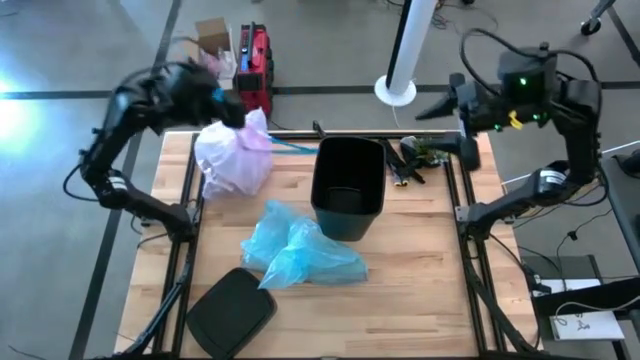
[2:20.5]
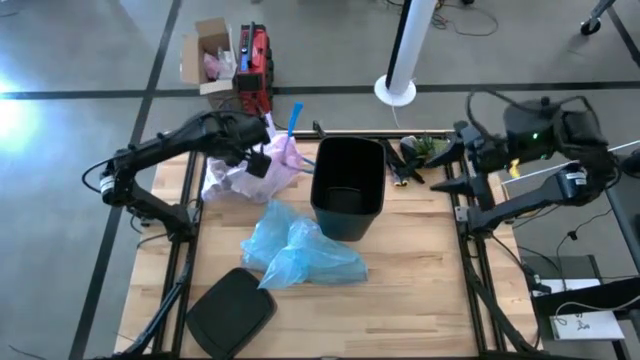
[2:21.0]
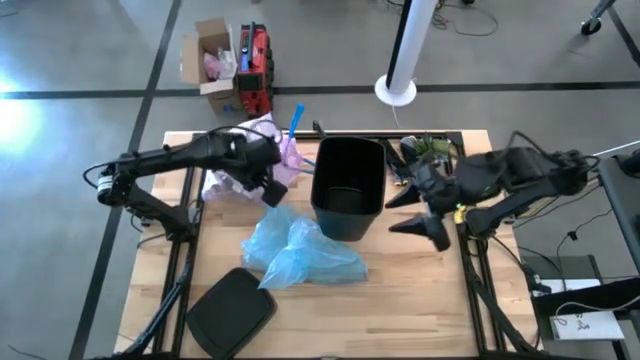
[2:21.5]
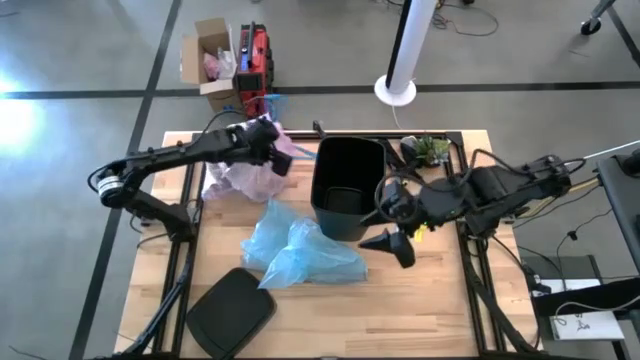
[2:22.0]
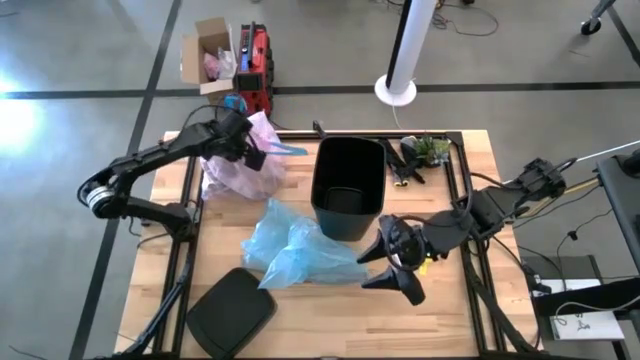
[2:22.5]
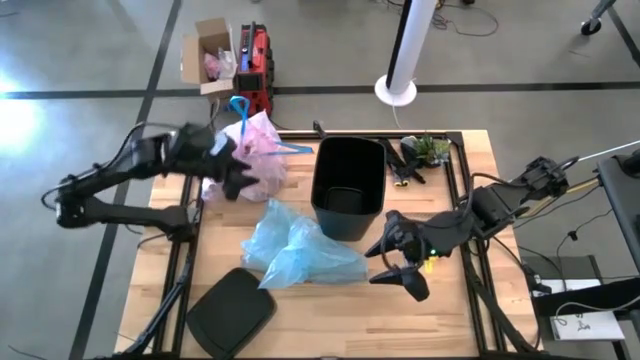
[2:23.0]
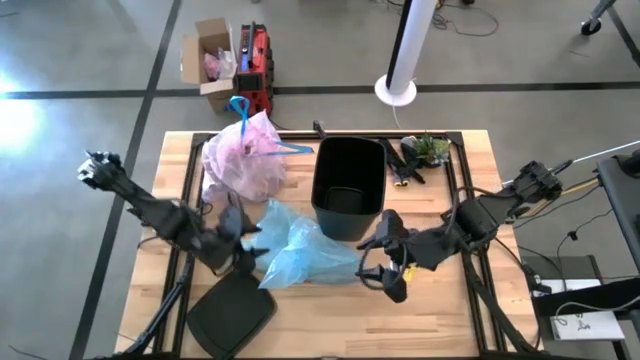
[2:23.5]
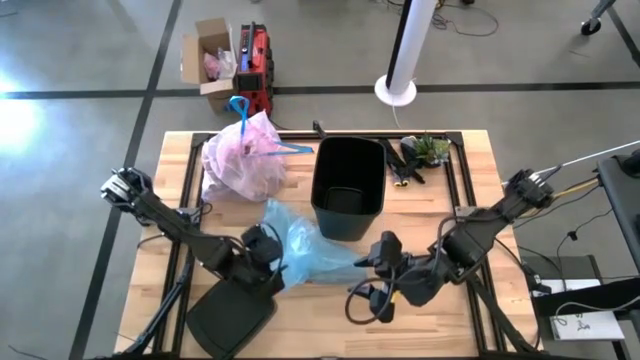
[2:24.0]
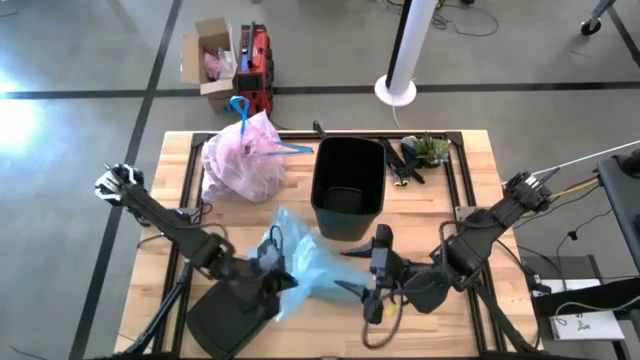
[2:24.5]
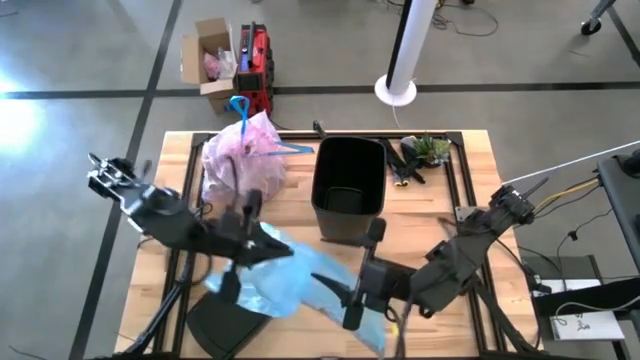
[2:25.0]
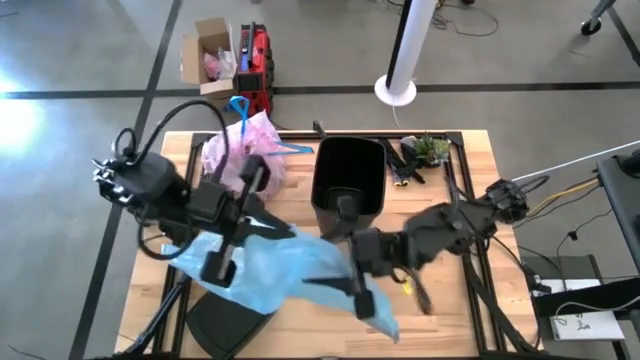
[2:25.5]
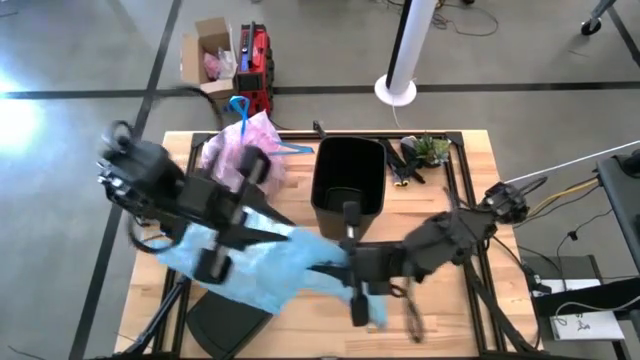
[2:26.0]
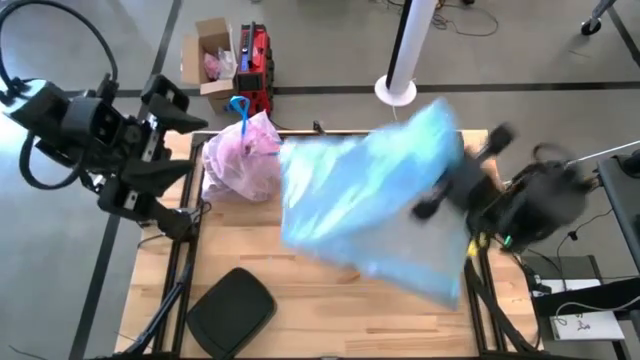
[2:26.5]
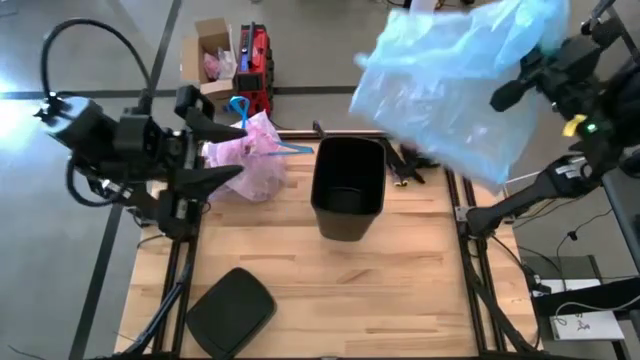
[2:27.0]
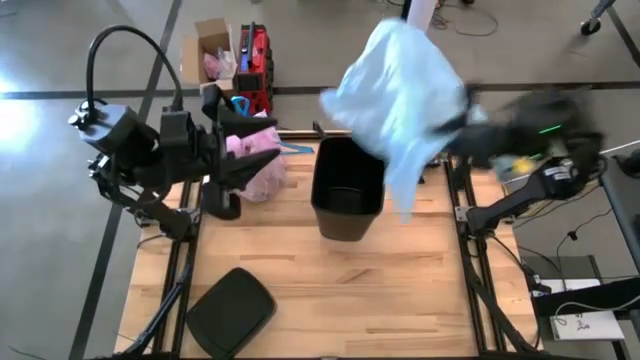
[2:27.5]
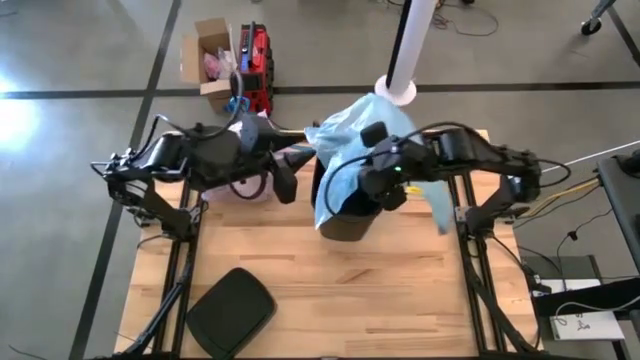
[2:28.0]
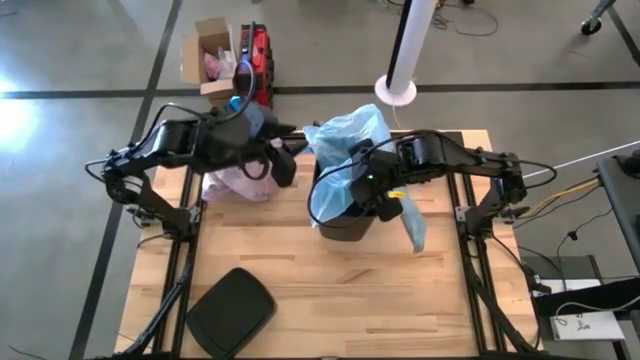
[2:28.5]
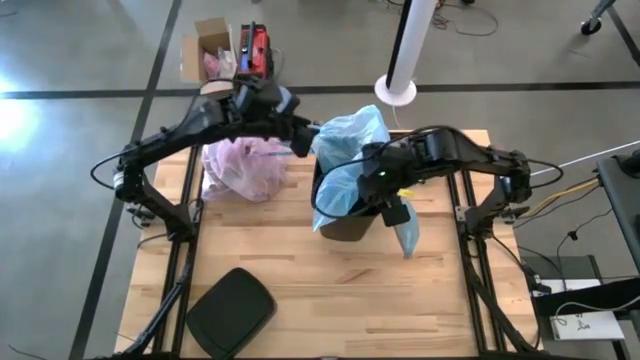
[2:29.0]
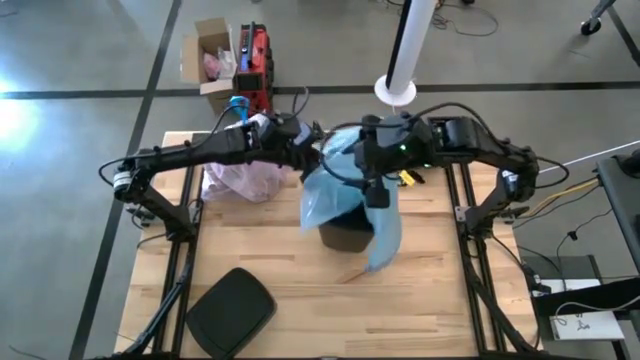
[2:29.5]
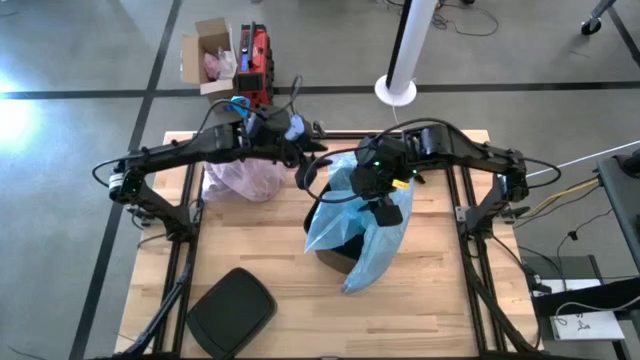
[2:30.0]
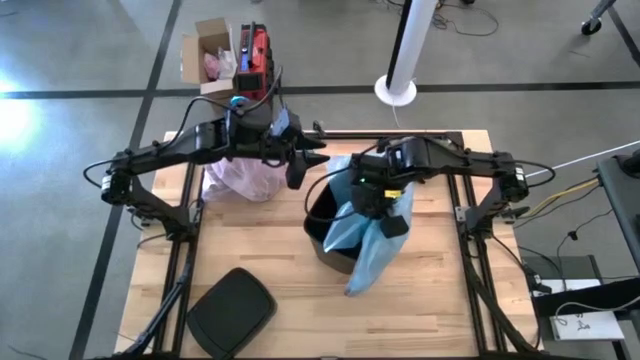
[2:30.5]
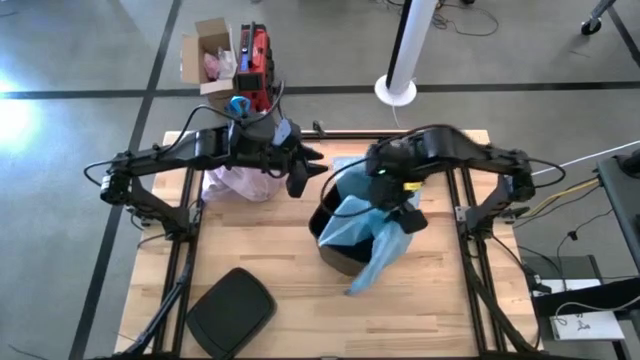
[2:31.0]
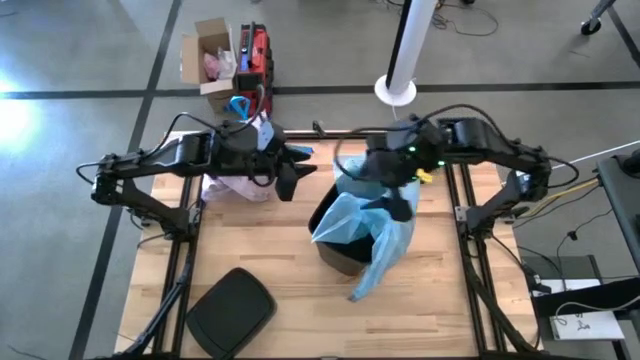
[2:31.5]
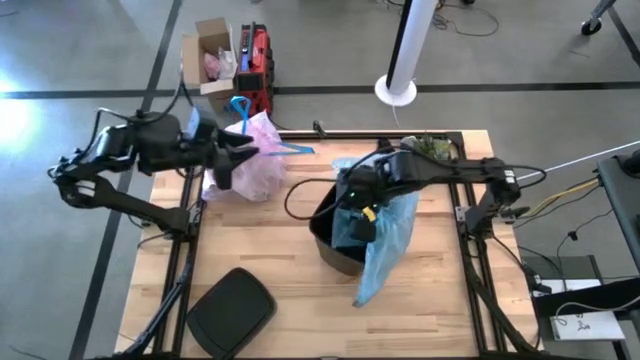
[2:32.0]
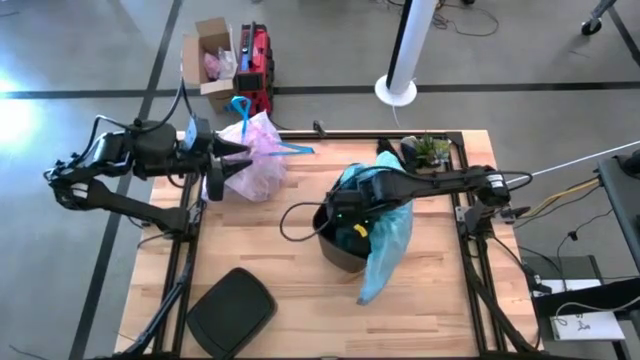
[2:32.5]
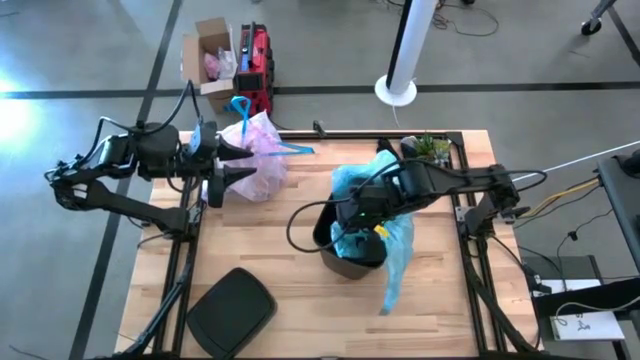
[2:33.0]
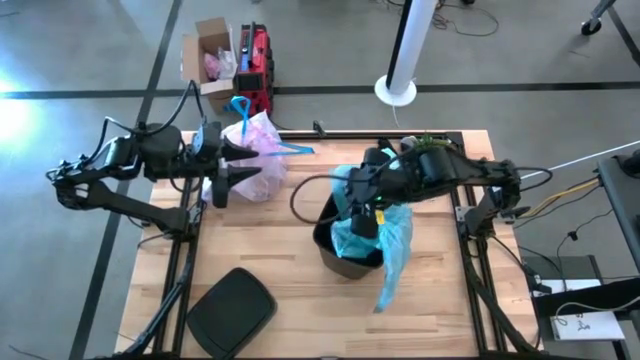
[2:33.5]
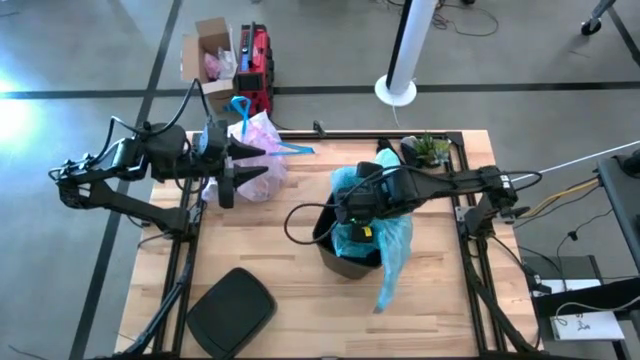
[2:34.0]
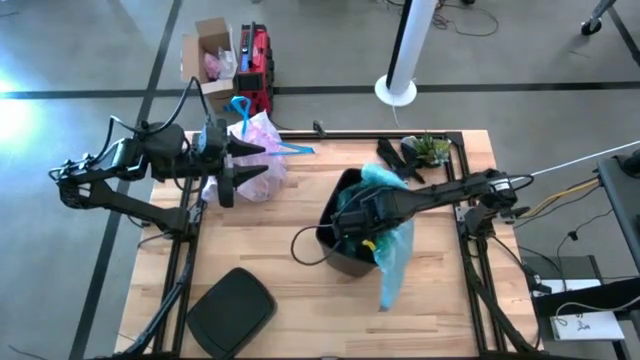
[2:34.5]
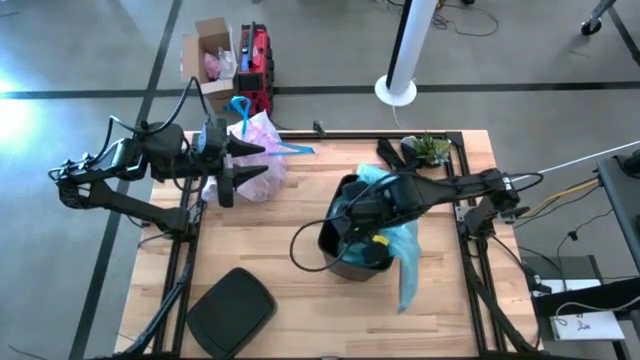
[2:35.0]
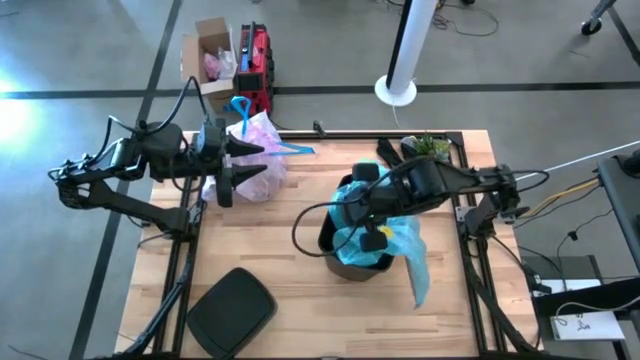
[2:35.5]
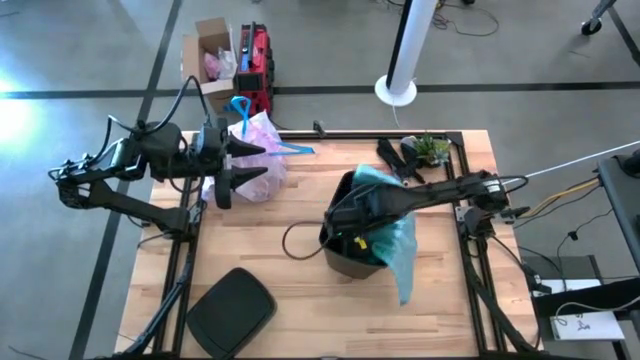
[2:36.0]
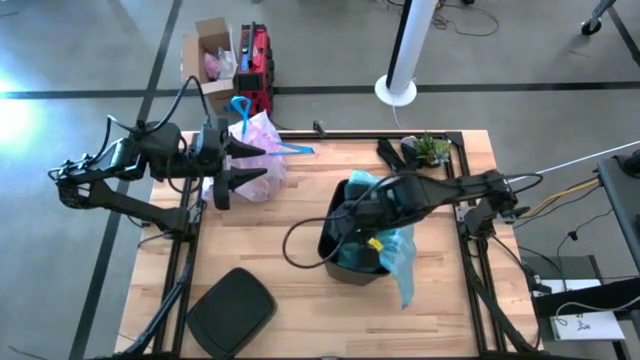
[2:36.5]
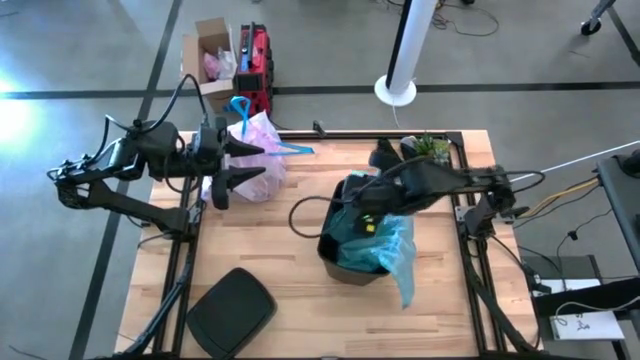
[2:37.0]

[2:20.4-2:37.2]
Task: place trash/remove bag and relplace
Insert the blue trash bag into the trash bin

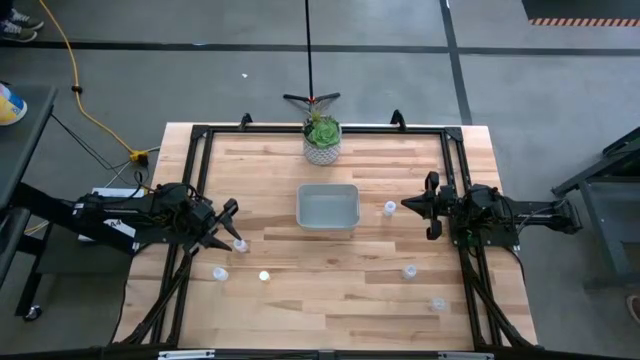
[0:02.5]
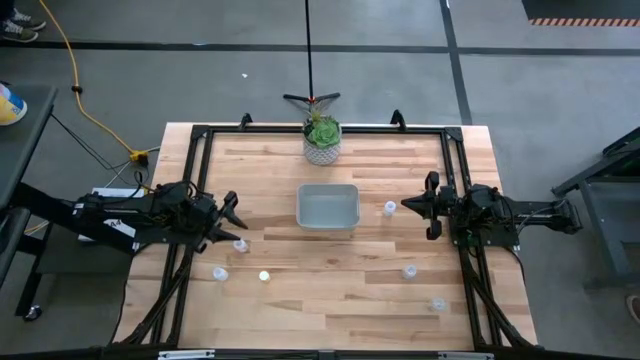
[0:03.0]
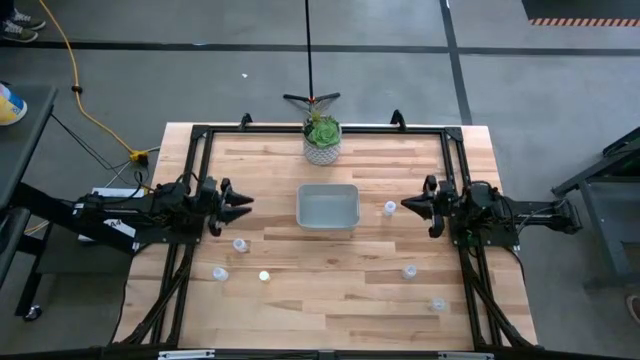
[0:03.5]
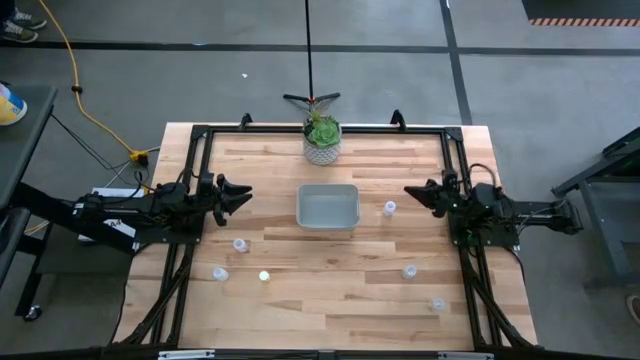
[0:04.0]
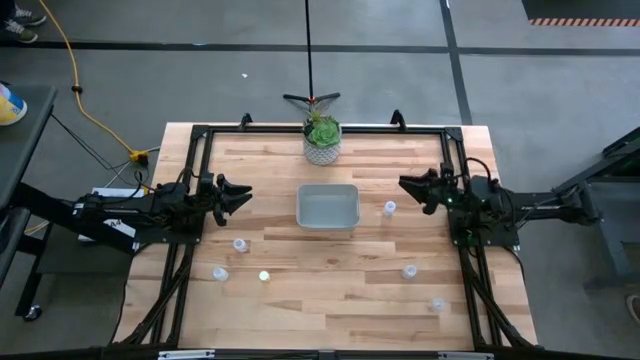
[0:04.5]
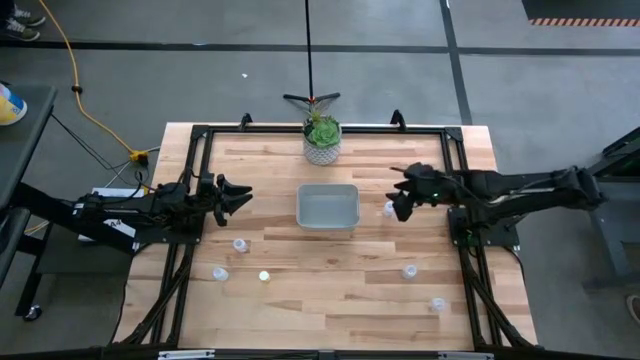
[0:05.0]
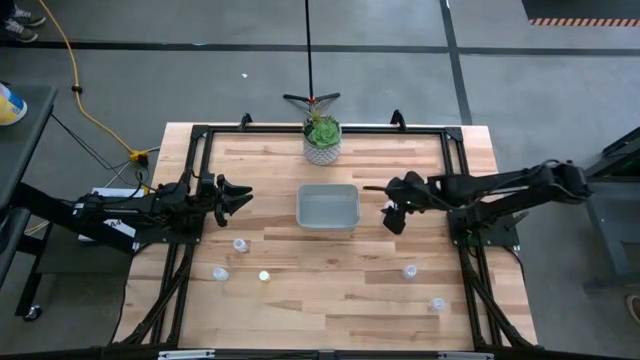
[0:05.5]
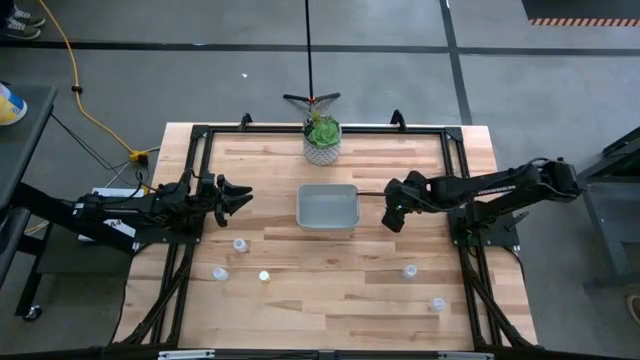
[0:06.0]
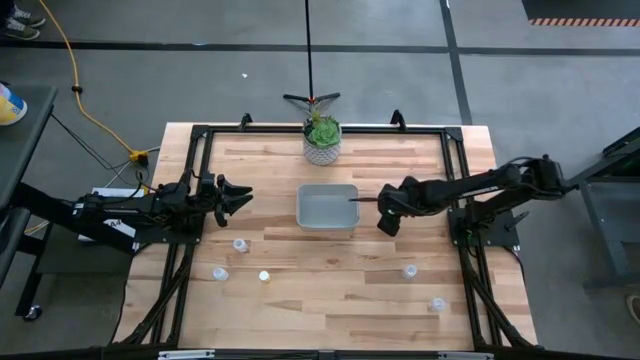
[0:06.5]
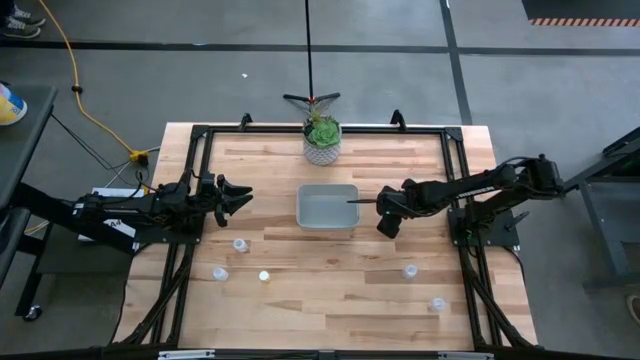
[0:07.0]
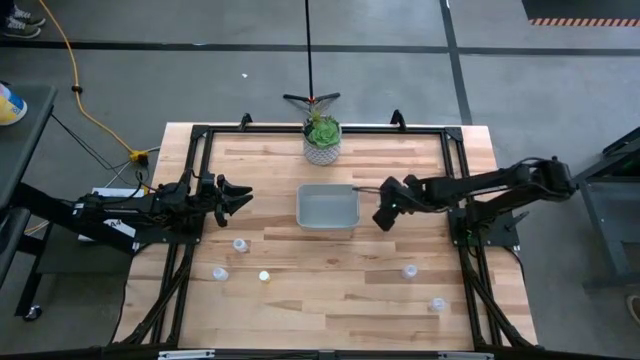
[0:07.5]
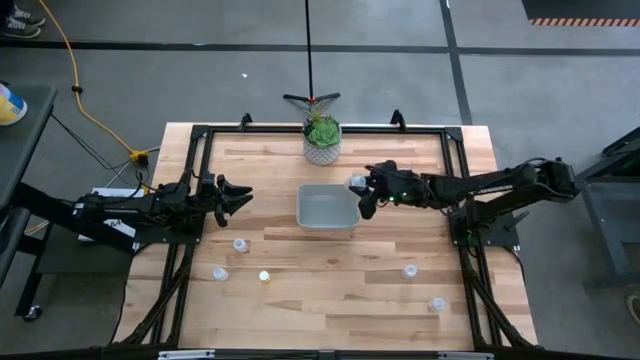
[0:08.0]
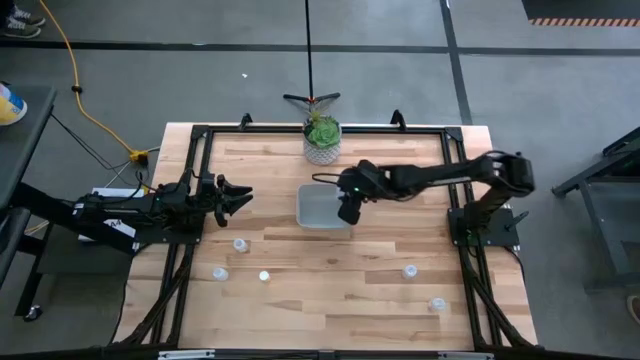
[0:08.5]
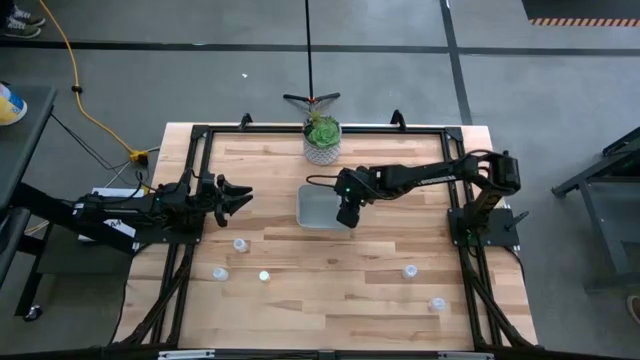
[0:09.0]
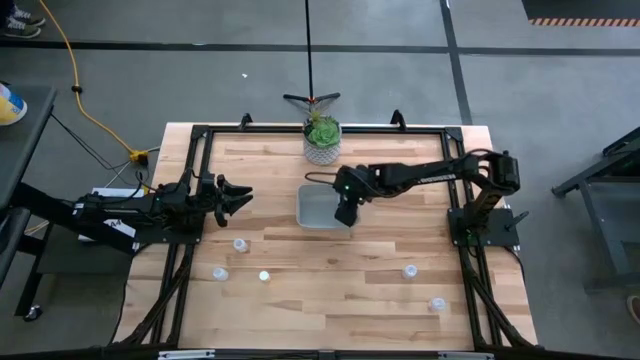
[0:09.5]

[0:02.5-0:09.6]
Task: Pick and place pill bottles into a basket
Put the transparent pill bottle into the gray bin
